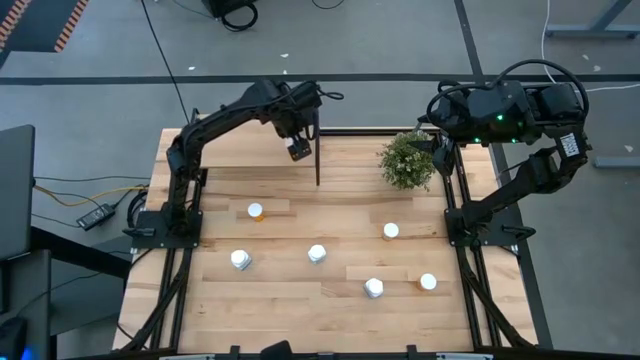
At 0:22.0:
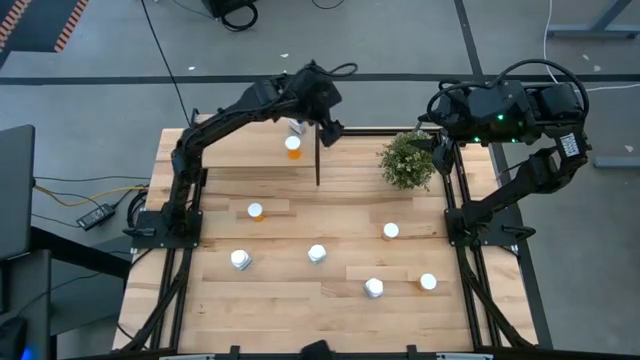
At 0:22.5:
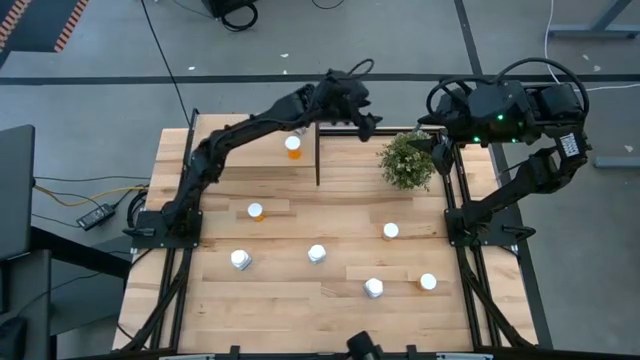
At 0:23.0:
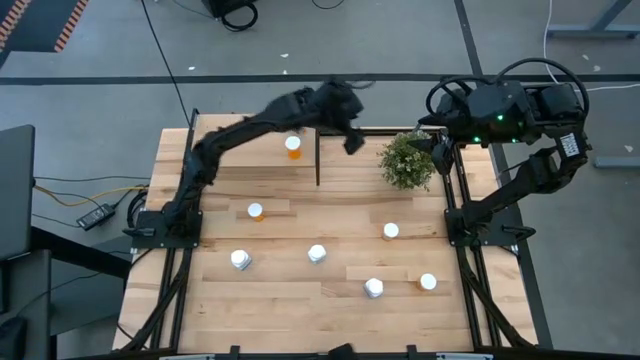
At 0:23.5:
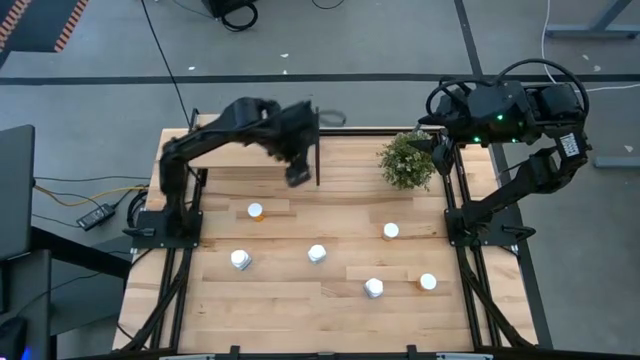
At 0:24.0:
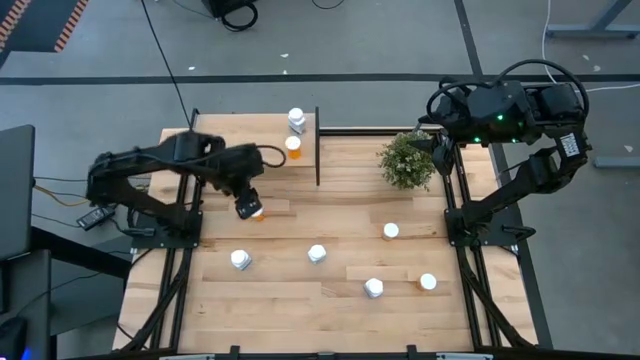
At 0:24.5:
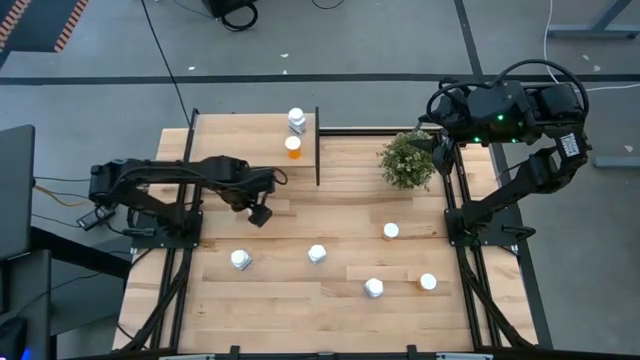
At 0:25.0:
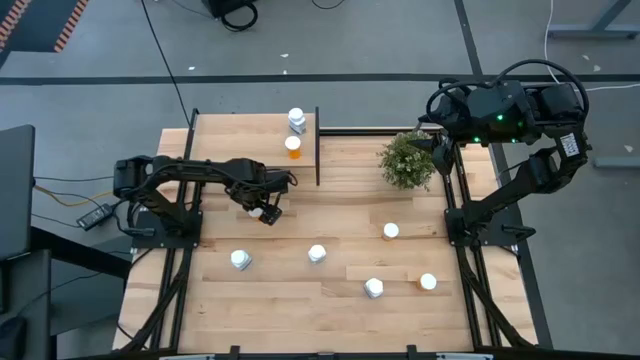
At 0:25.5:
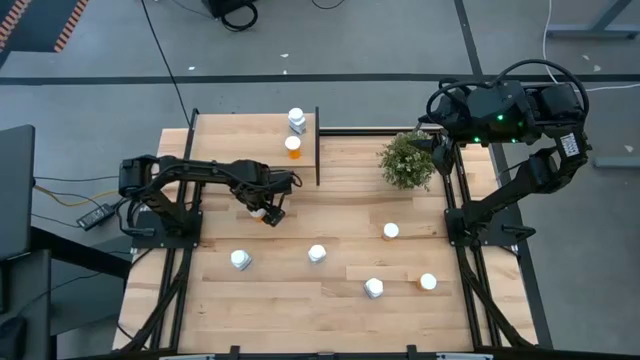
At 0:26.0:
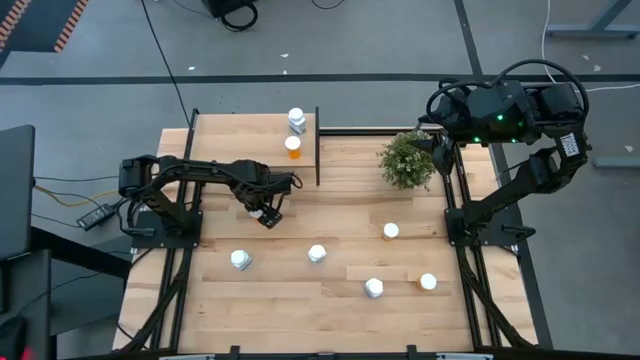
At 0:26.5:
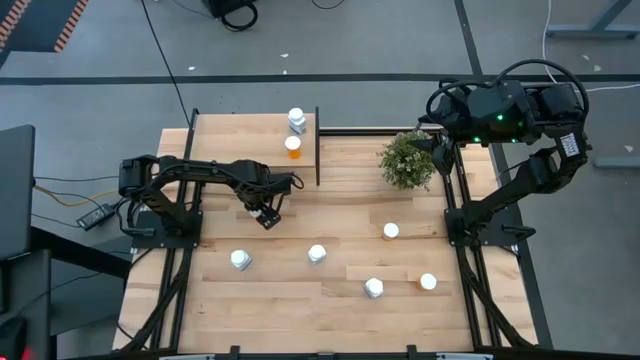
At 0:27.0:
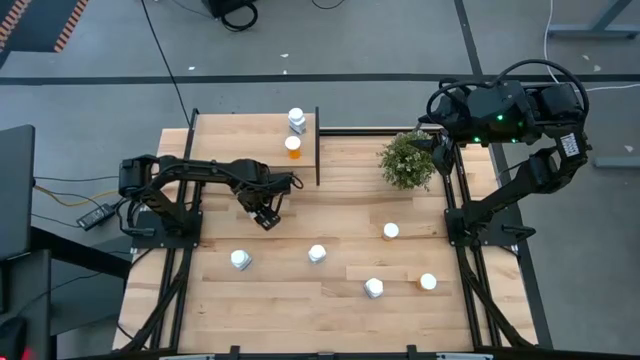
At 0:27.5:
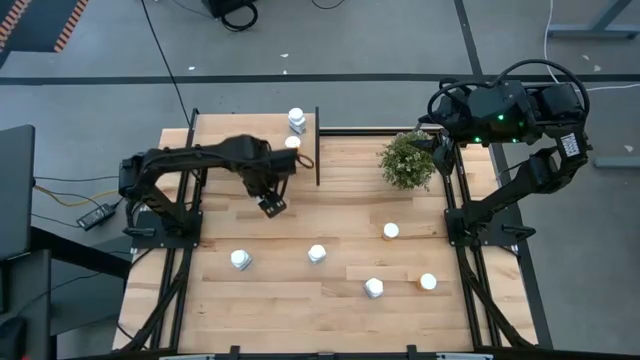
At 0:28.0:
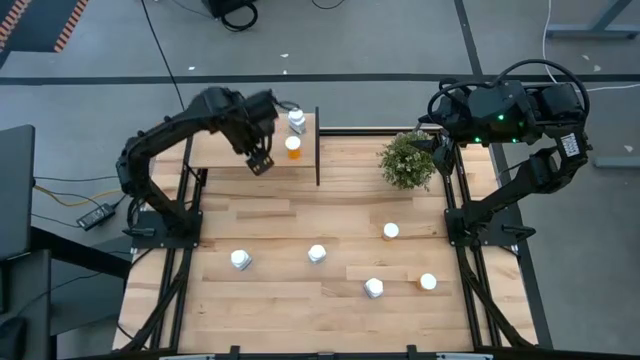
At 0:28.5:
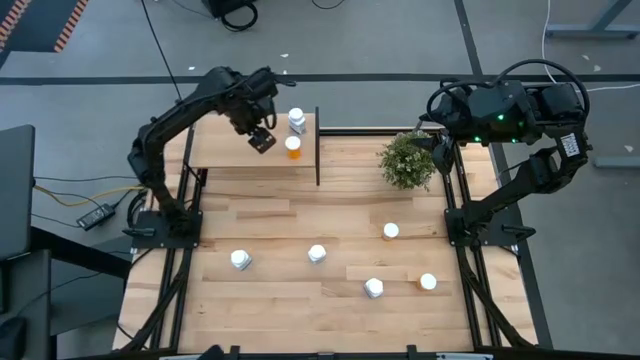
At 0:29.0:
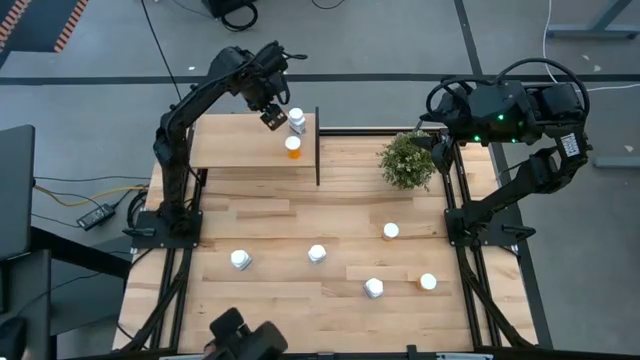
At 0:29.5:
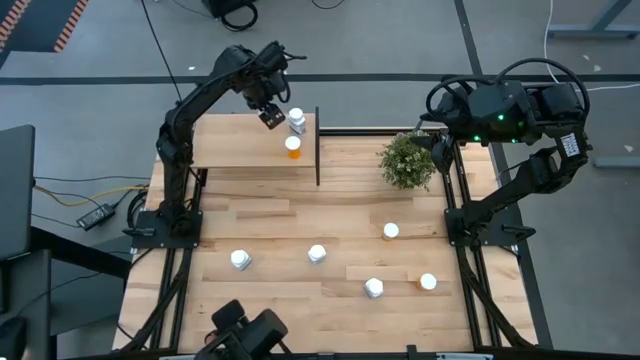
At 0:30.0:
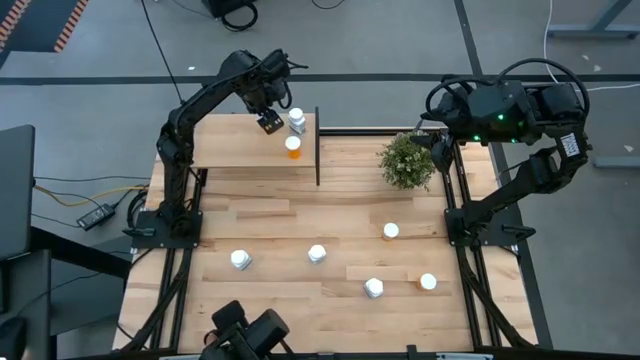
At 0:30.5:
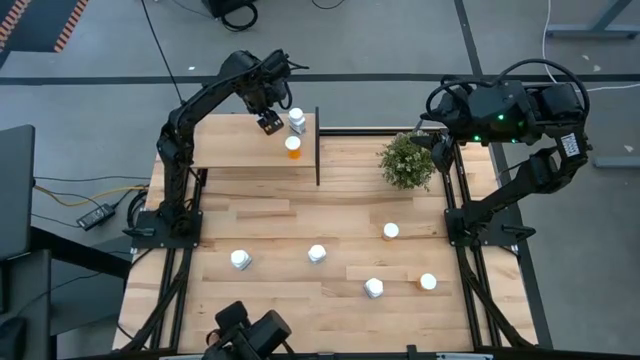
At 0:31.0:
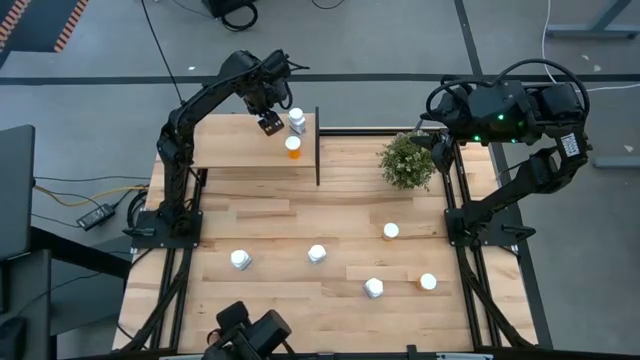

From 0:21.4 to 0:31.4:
Task: Pick and place medicine bottles onto shelf by color
Put the orange pill bottle on the shelf

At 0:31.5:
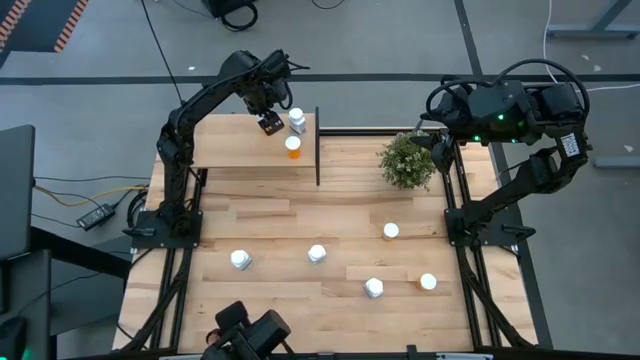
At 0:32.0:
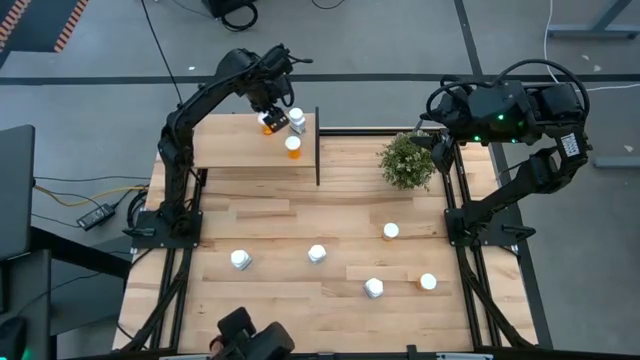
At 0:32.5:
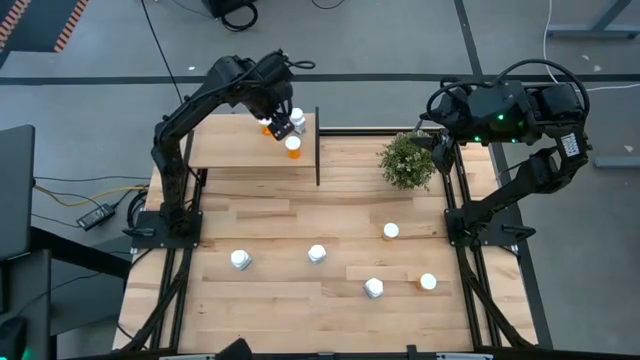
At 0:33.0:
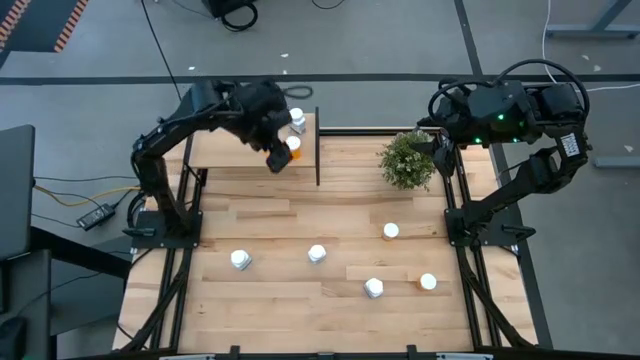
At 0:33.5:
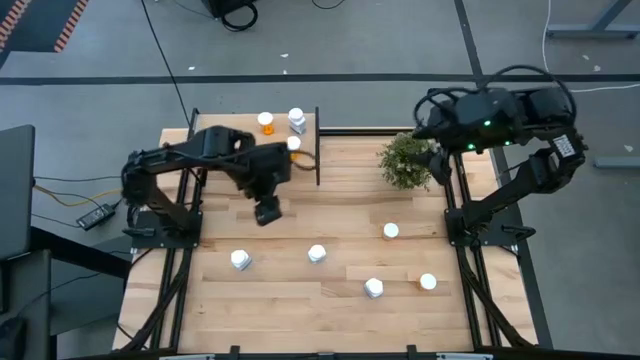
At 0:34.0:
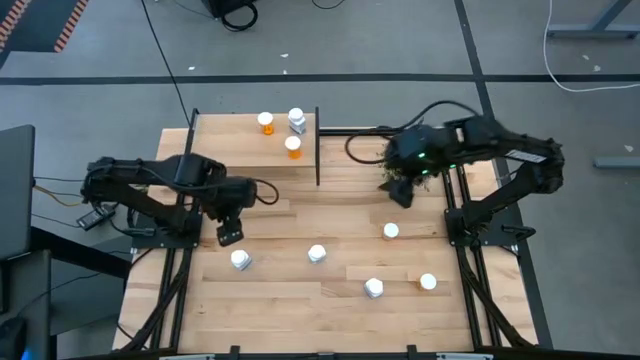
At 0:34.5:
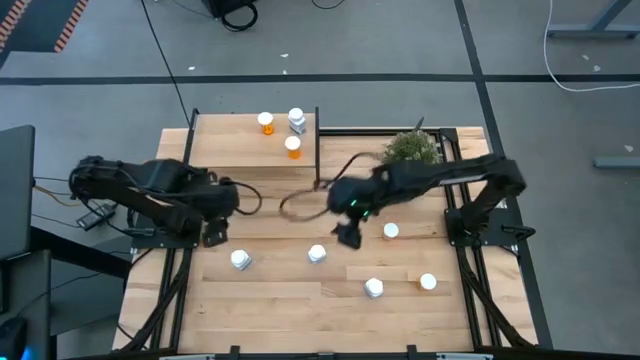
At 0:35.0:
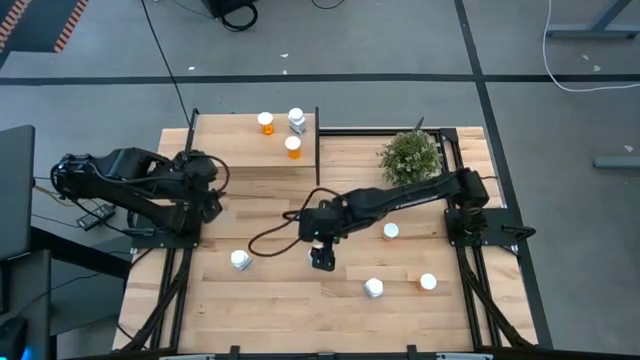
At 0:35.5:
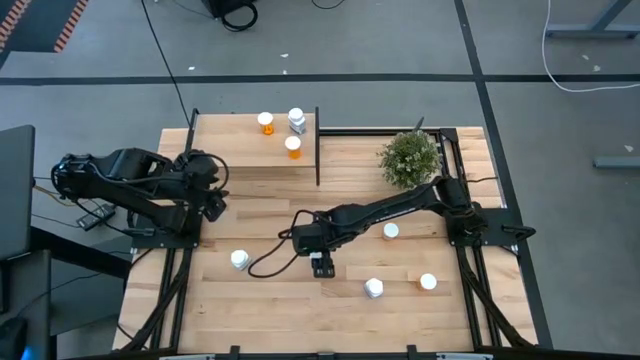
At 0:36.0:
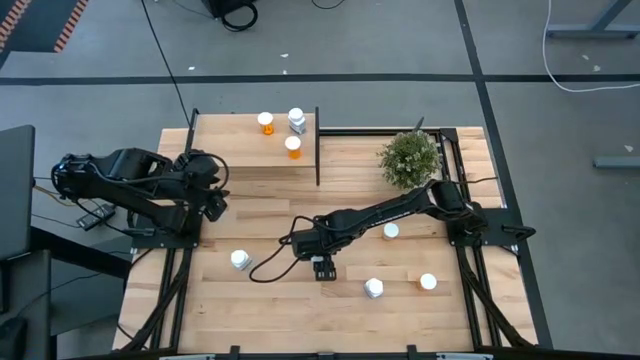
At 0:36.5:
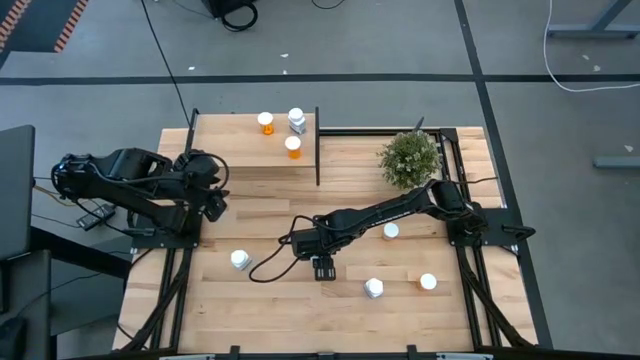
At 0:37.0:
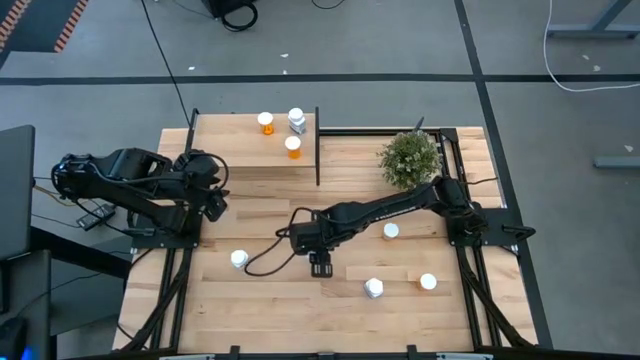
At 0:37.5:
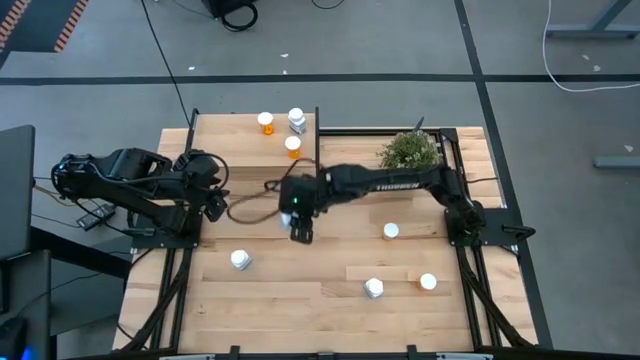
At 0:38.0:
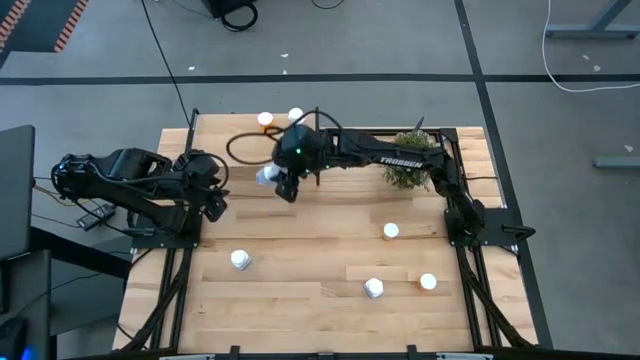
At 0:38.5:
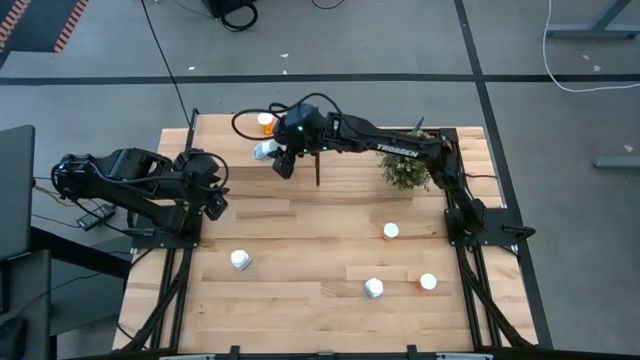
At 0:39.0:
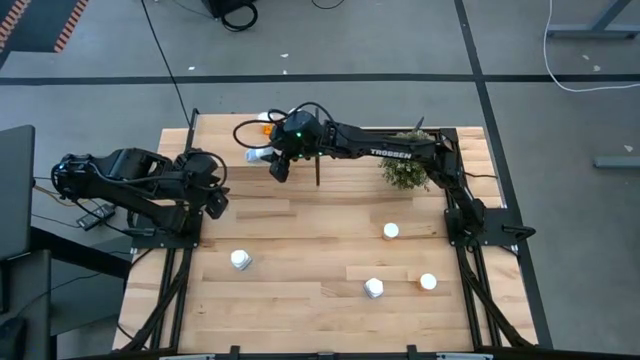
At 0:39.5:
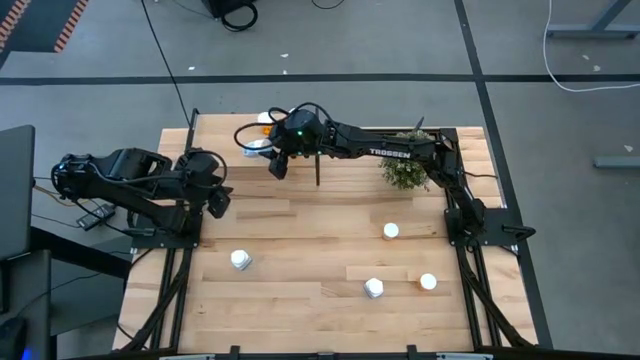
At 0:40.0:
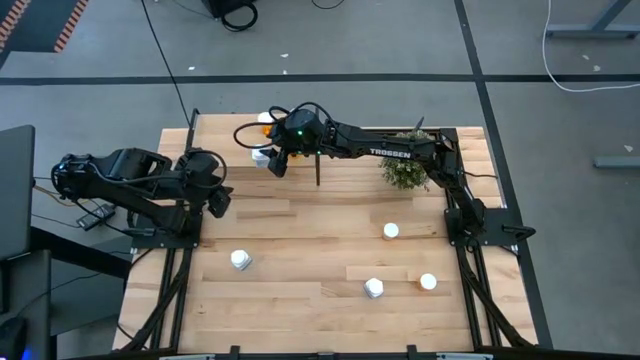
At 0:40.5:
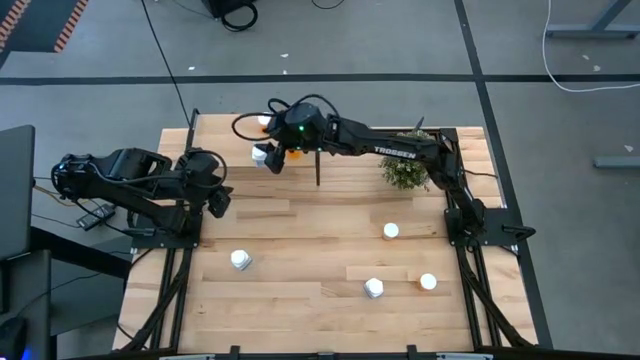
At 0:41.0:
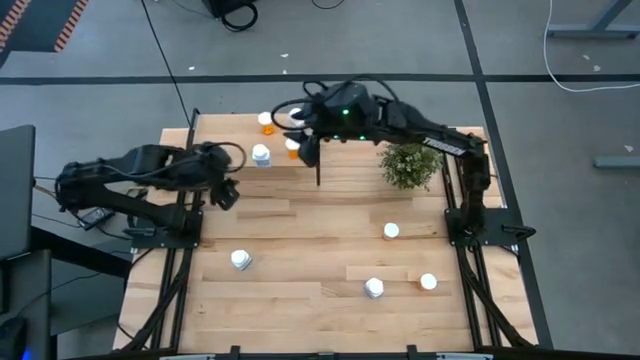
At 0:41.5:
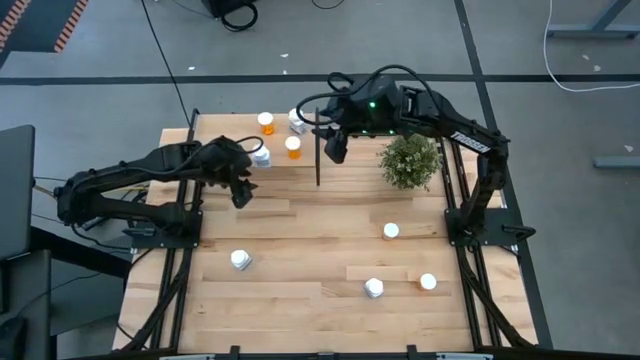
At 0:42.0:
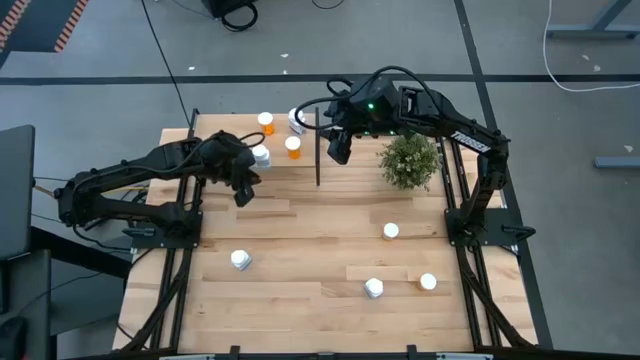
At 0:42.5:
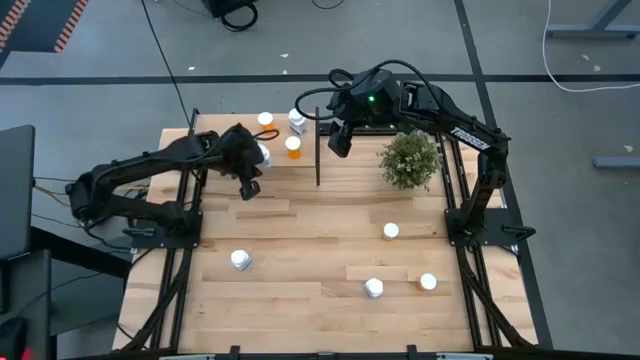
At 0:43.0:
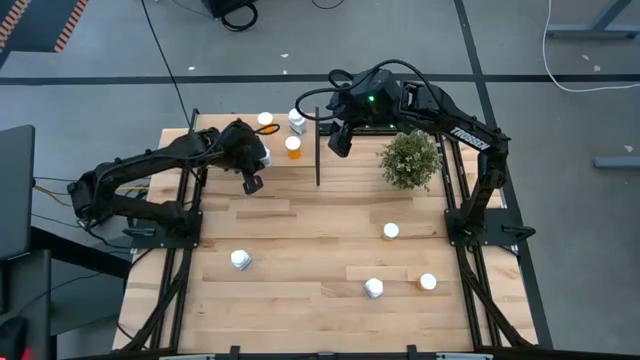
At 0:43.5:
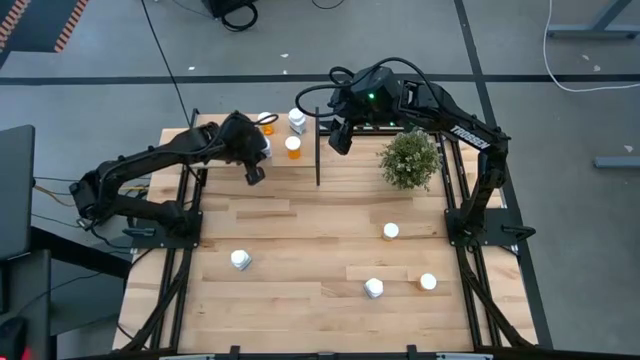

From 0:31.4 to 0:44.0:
Put the supplement bottle on the shelf
